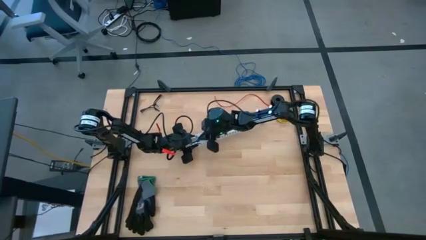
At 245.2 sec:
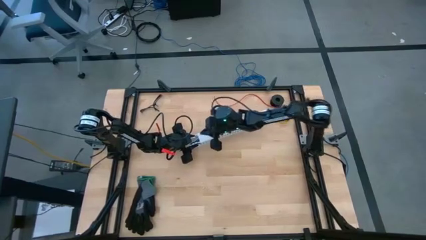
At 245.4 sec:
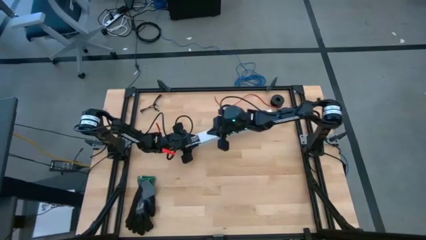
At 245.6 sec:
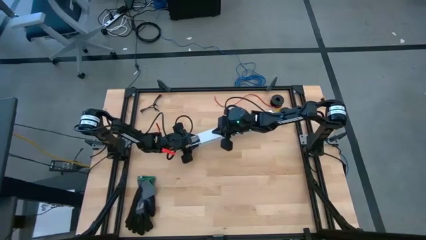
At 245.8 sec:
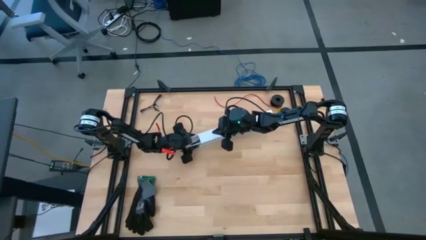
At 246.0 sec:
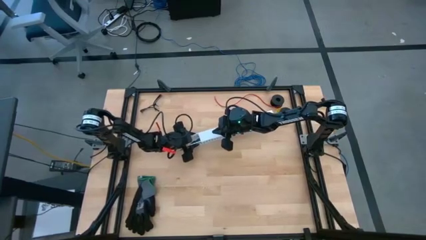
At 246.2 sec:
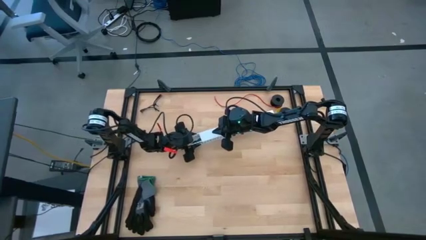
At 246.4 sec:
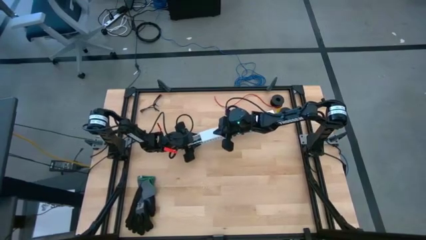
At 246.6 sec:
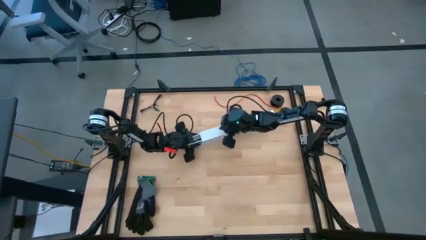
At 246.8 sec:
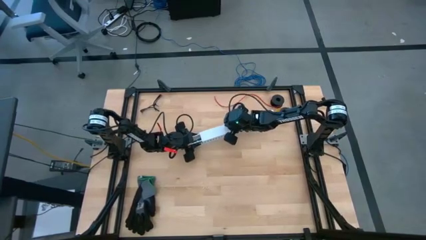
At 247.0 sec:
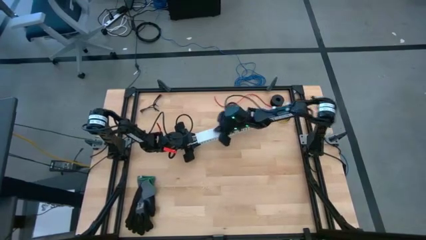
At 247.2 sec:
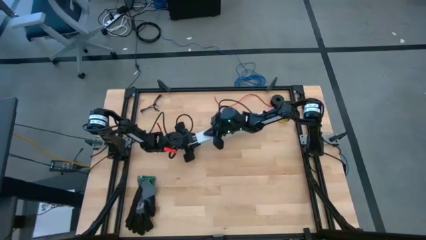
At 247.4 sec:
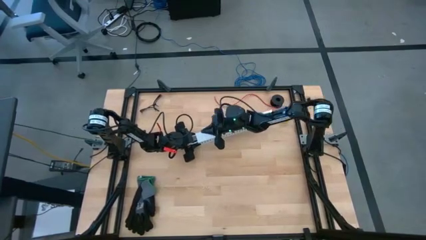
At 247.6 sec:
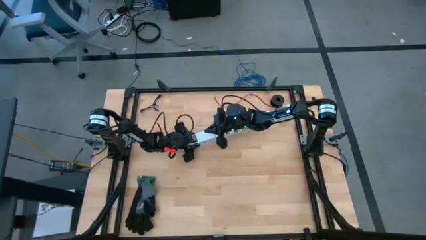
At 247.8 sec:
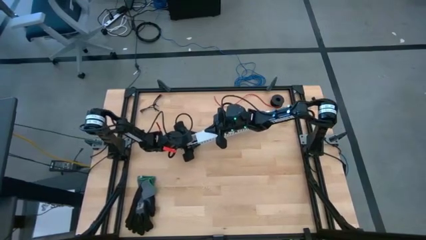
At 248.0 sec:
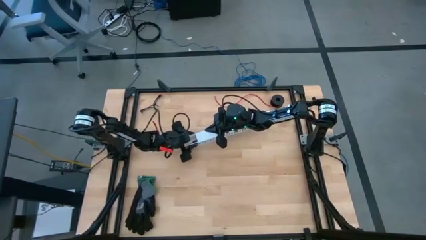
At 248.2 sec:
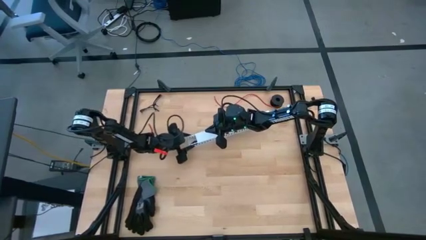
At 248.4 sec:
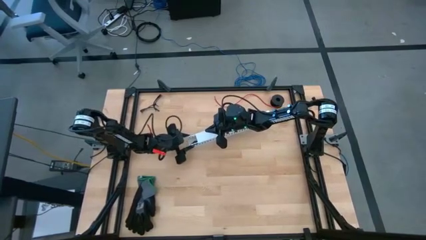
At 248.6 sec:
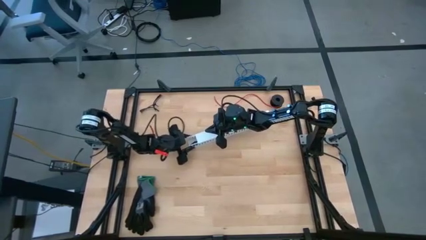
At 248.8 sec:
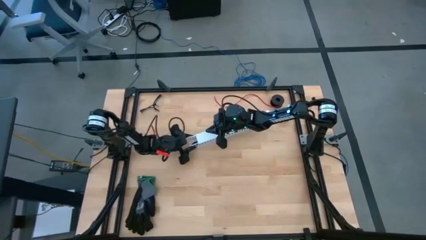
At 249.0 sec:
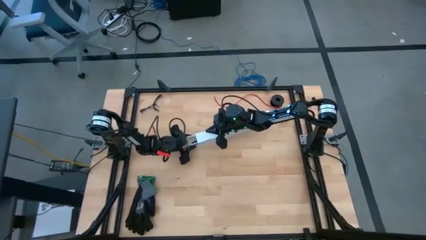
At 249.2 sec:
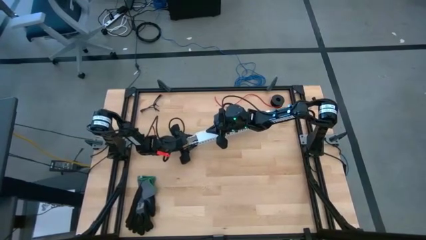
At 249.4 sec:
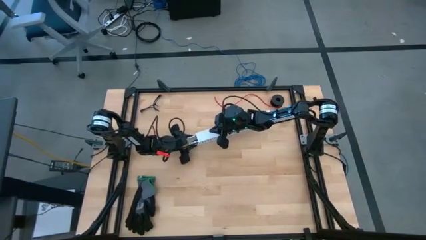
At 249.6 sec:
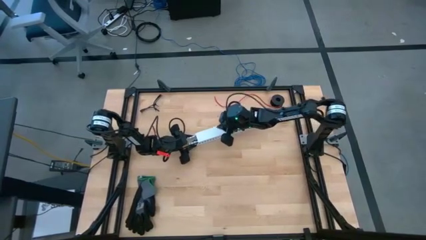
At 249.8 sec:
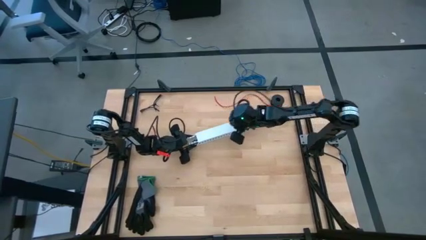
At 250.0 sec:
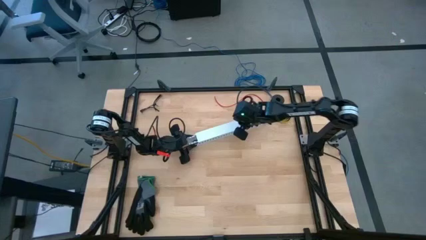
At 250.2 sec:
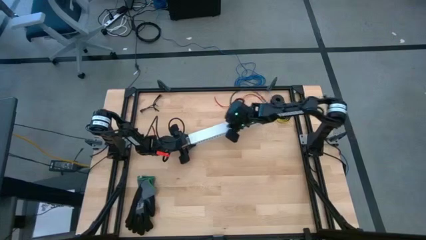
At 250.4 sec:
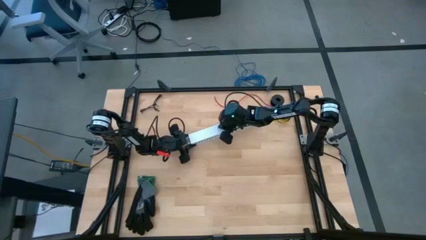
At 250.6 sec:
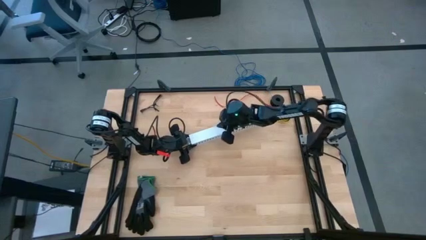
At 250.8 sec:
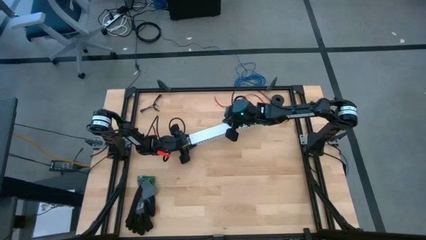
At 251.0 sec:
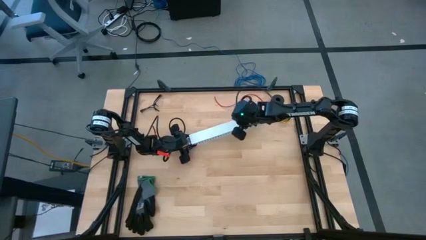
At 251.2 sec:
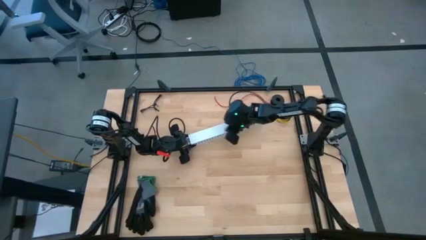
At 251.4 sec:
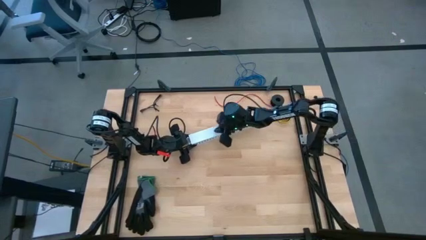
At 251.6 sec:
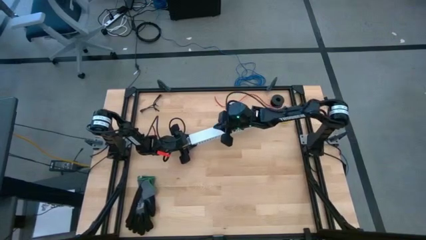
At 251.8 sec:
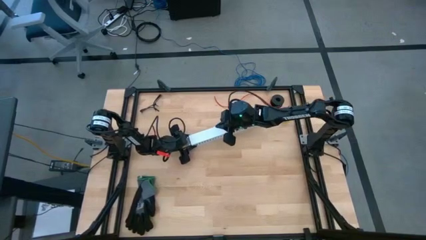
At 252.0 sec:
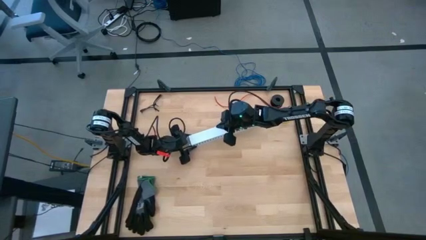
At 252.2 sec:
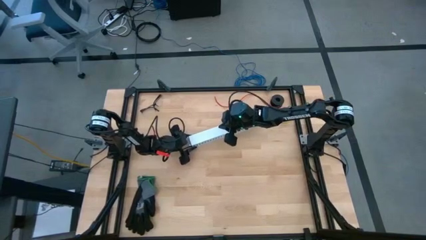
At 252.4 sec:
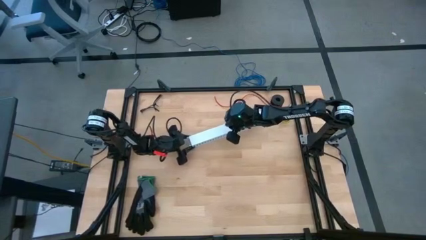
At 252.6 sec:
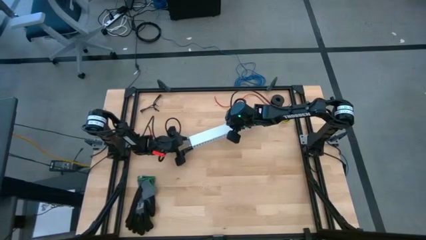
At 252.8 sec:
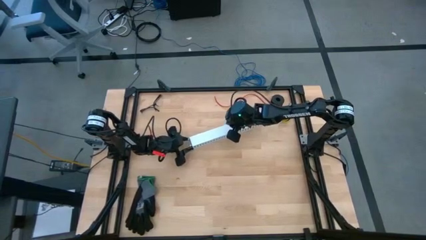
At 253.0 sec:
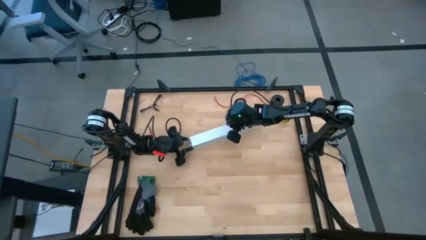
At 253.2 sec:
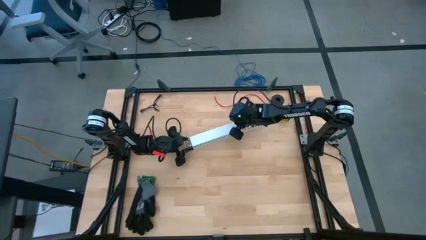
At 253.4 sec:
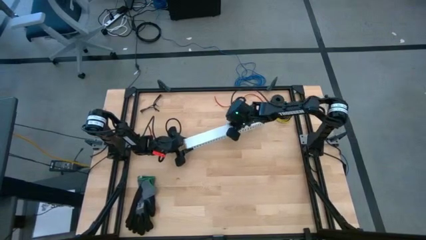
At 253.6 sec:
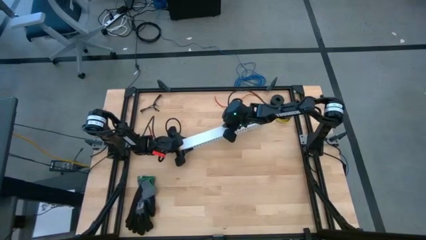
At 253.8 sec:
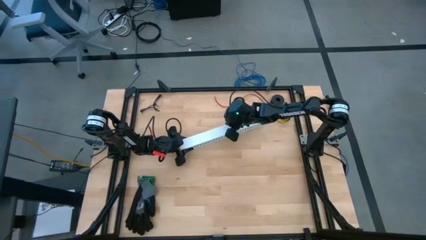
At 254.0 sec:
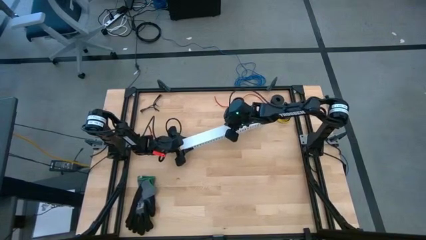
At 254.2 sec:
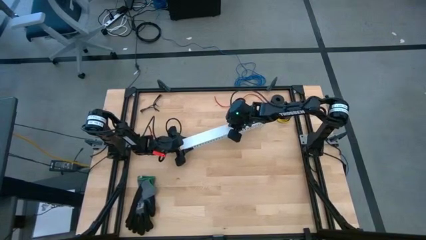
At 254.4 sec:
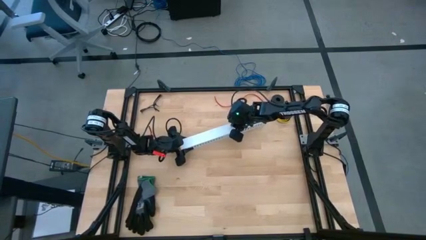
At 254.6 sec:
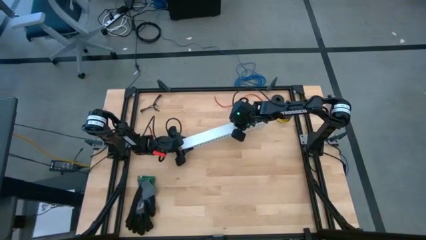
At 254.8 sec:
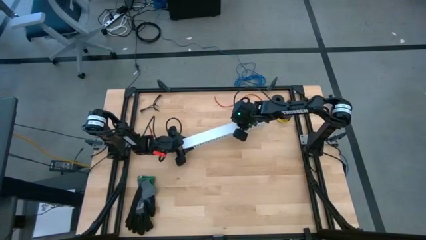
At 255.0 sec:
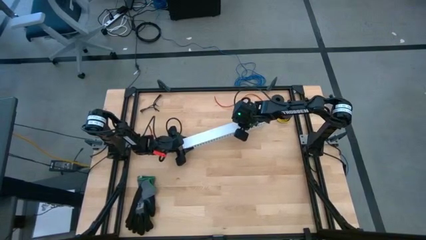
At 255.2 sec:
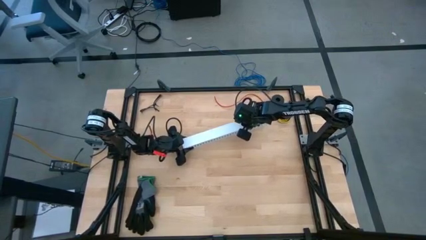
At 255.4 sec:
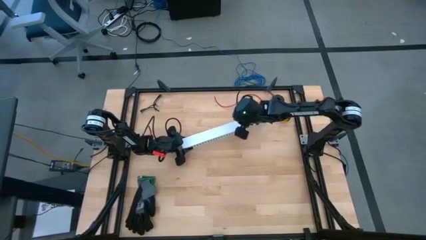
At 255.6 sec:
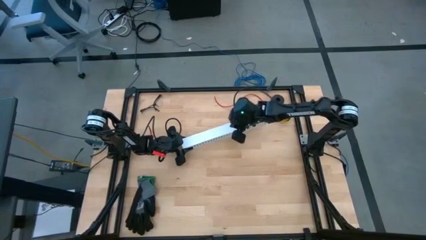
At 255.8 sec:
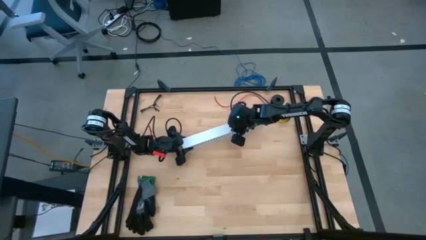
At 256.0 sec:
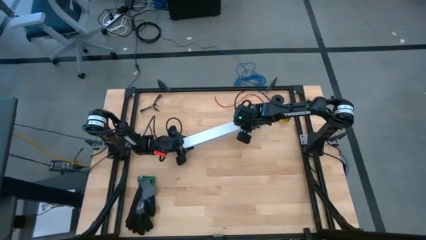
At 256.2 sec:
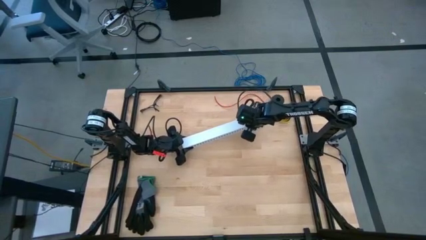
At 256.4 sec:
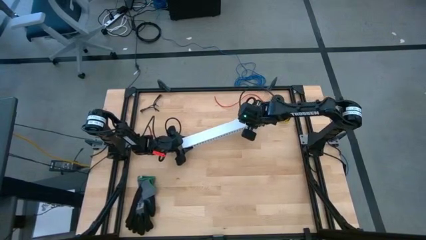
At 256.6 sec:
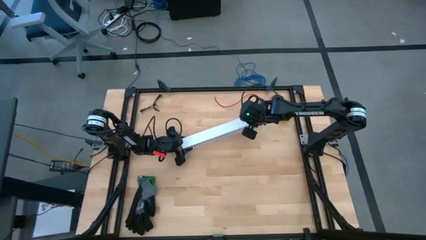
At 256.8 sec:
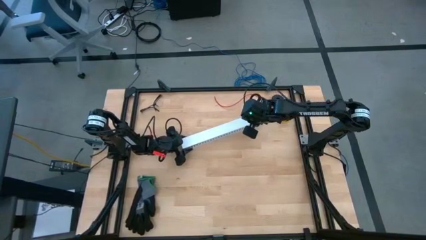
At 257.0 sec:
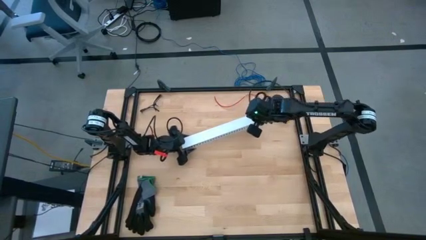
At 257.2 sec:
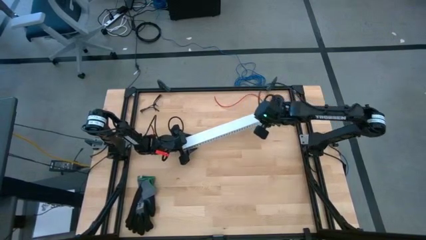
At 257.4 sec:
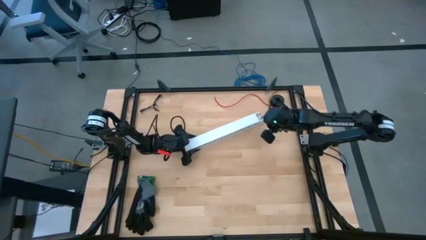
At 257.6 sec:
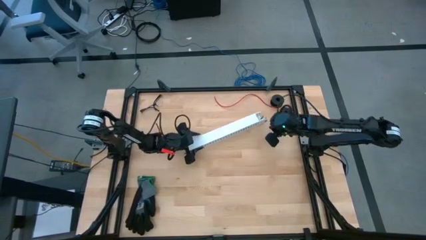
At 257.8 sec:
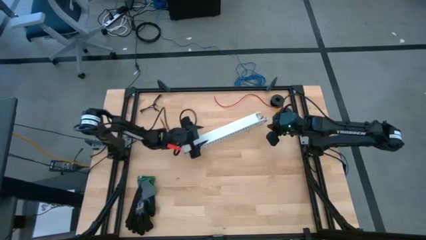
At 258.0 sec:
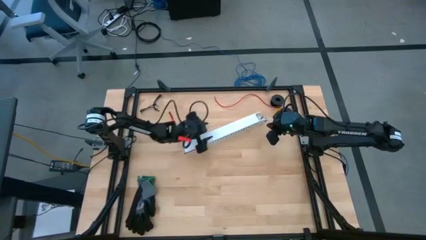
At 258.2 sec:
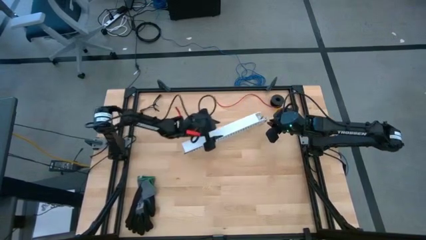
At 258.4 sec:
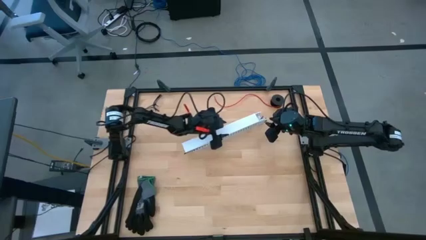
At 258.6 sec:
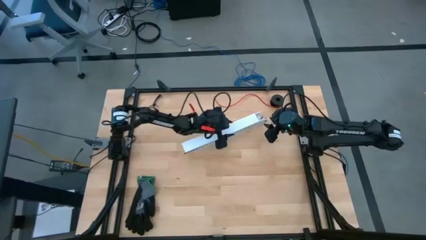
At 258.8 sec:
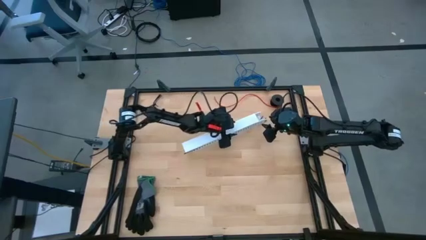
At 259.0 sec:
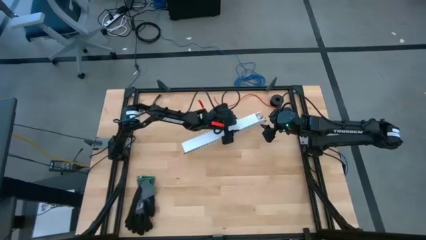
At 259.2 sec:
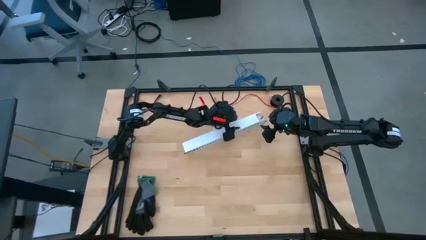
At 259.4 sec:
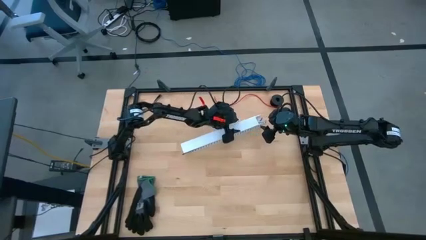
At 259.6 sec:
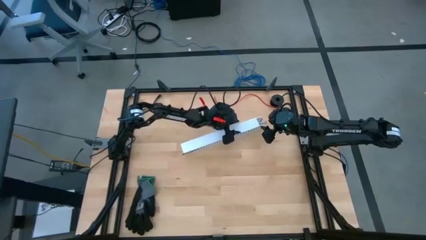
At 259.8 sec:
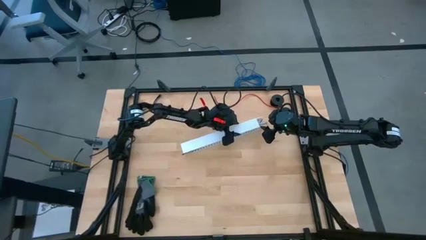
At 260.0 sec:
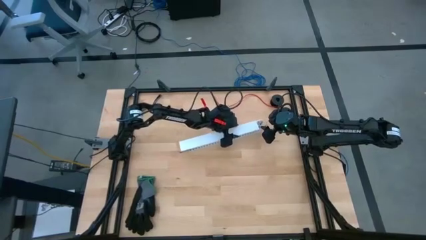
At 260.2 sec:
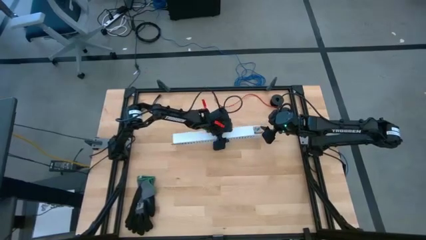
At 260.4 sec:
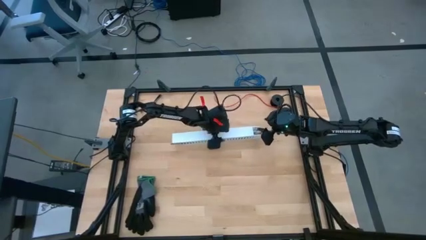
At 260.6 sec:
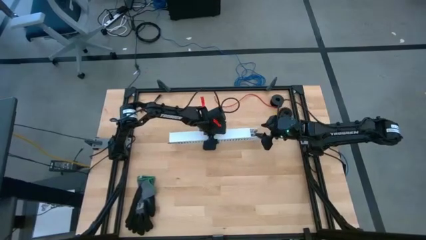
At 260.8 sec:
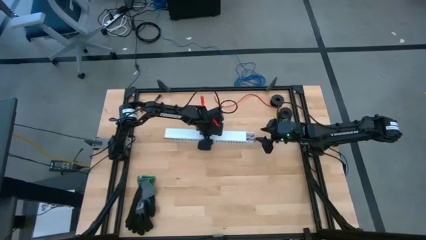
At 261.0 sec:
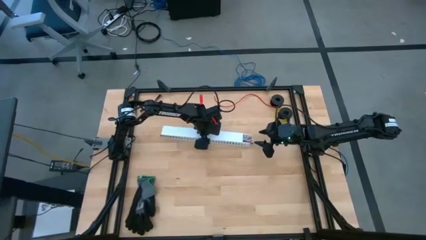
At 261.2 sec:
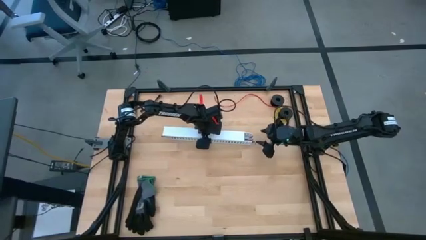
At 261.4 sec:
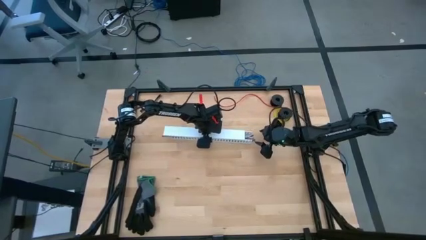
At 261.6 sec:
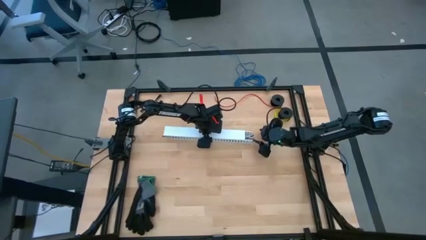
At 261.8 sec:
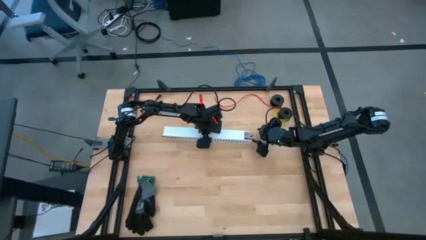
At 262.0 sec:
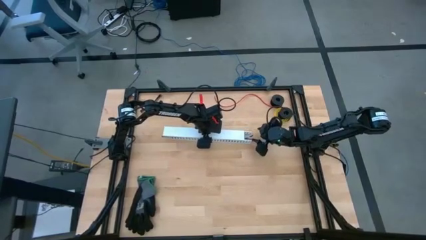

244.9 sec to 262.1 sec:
Task: Ziptie cables
Close the cable duct
